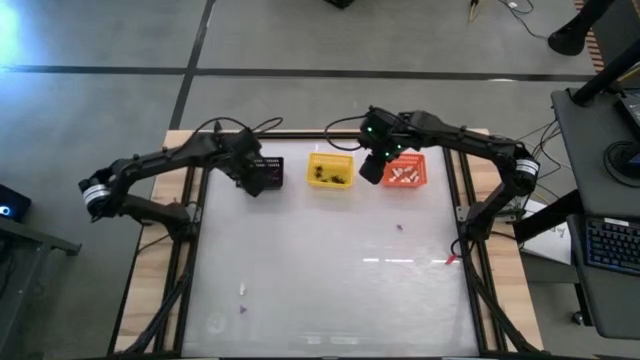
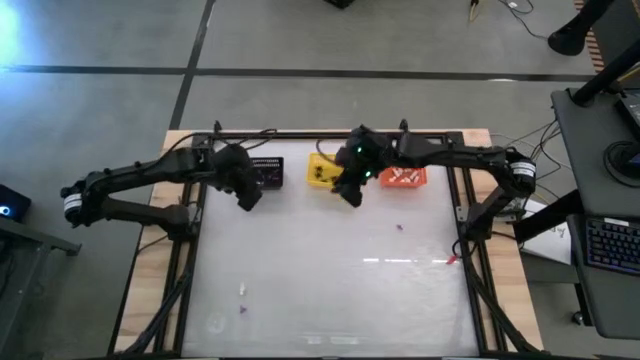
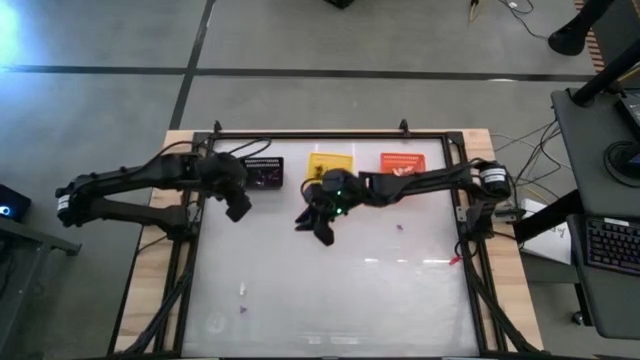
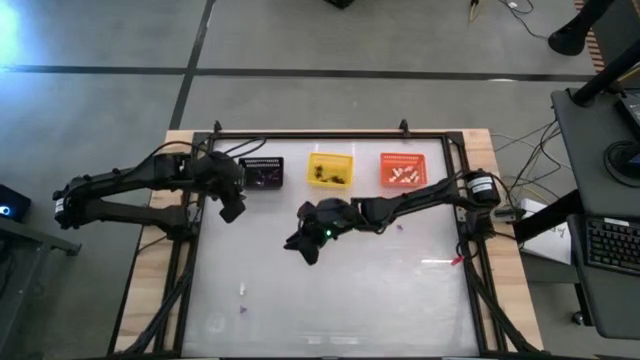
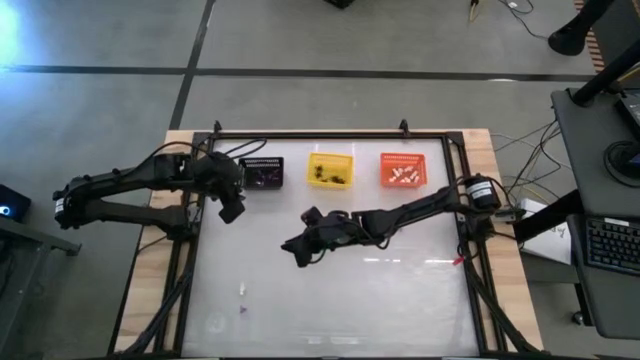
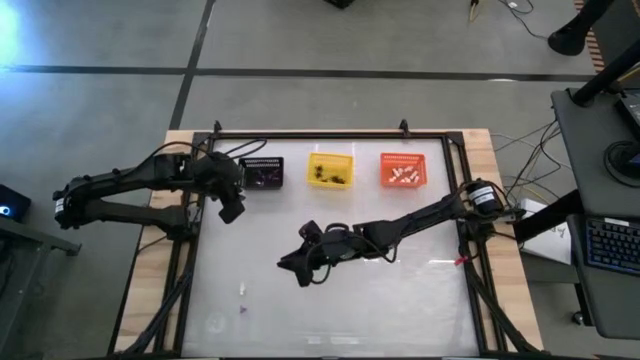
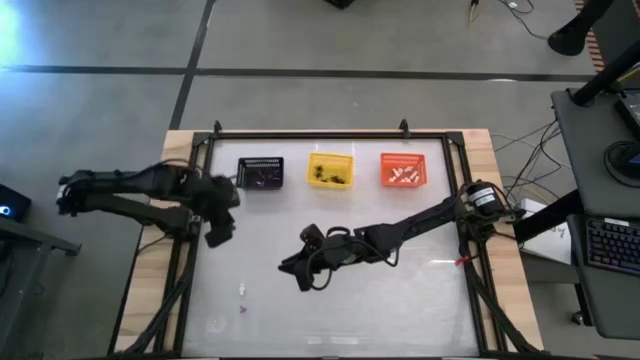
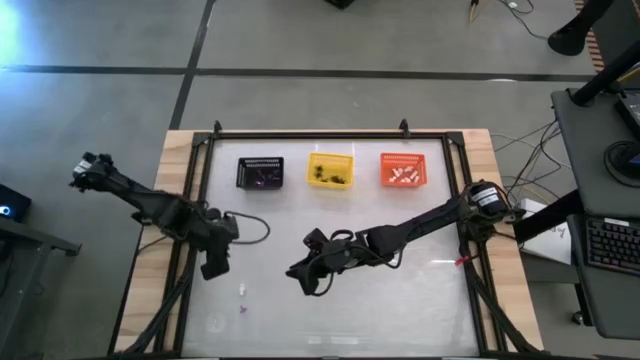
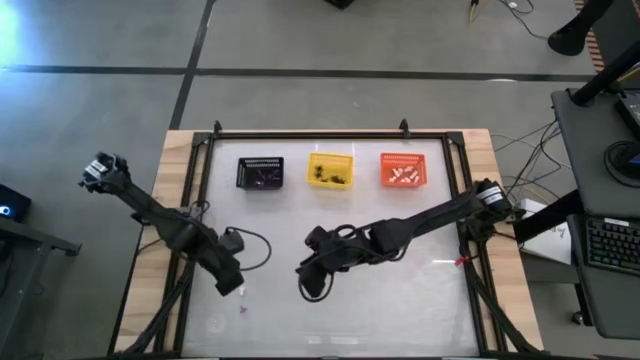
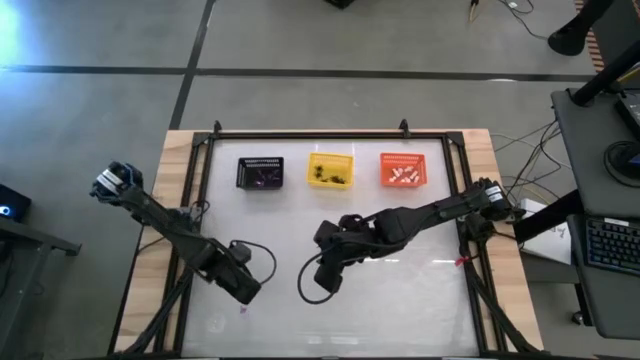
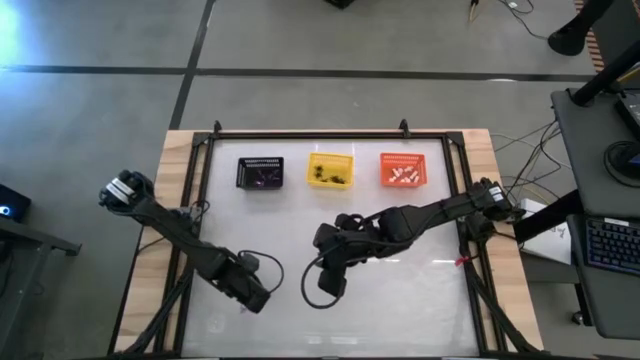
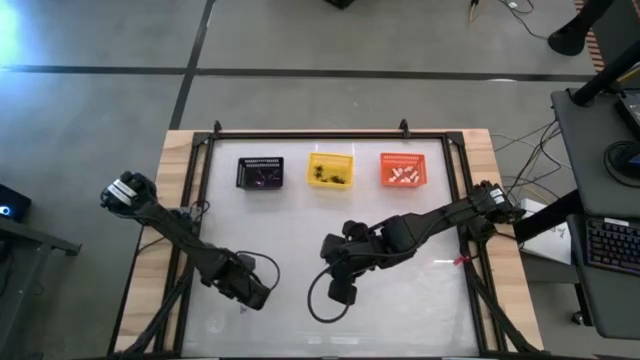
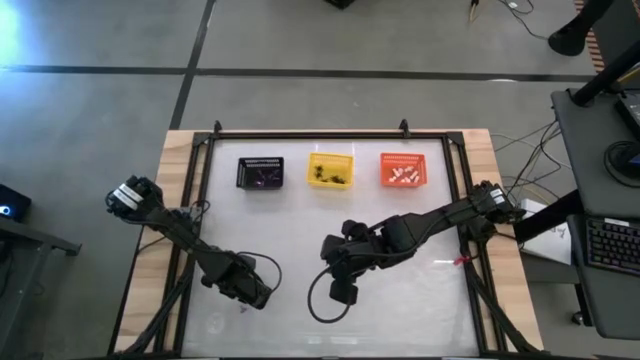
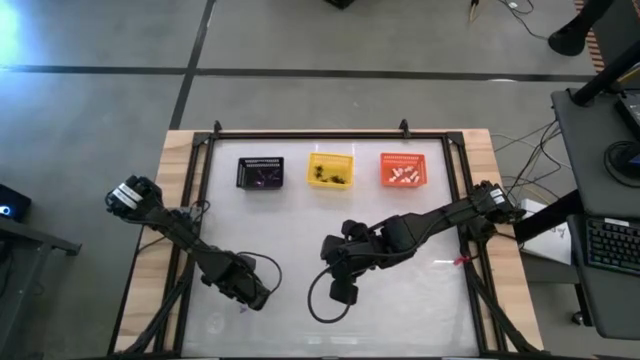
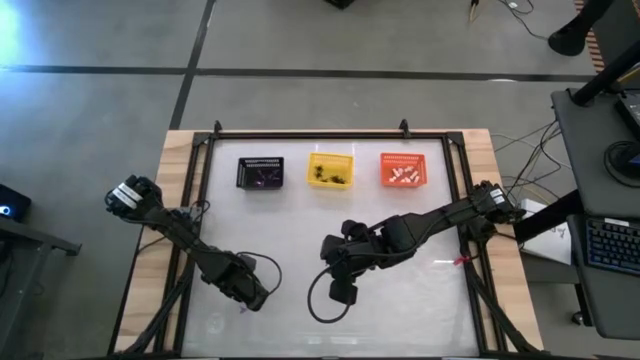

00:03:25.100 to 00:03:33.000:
Task: Sort Halloween decoration
Put the white skeleton toy into the orange bin

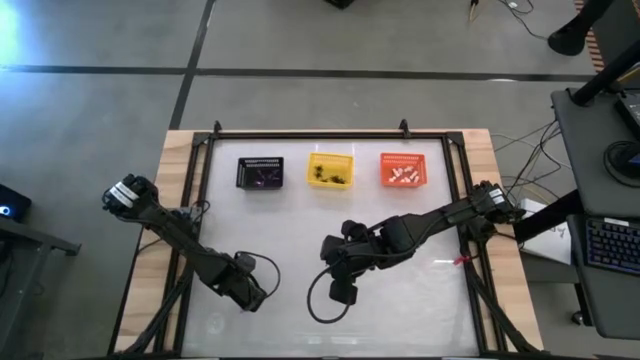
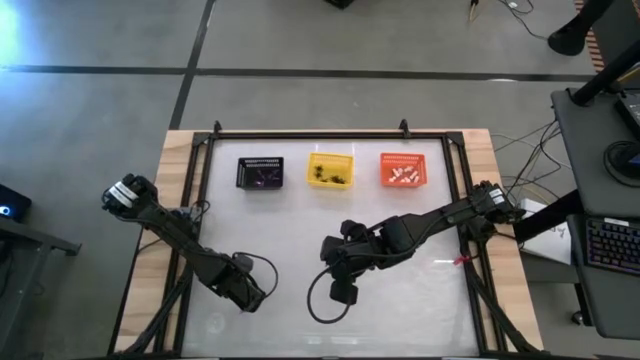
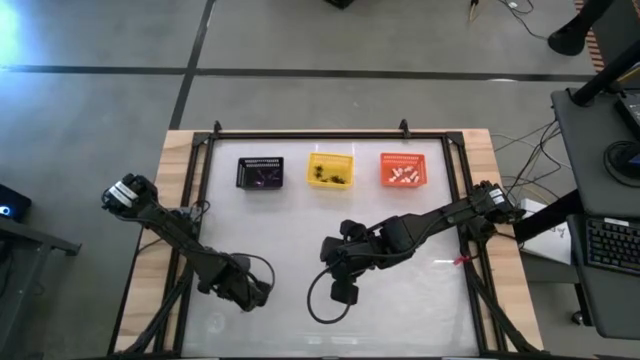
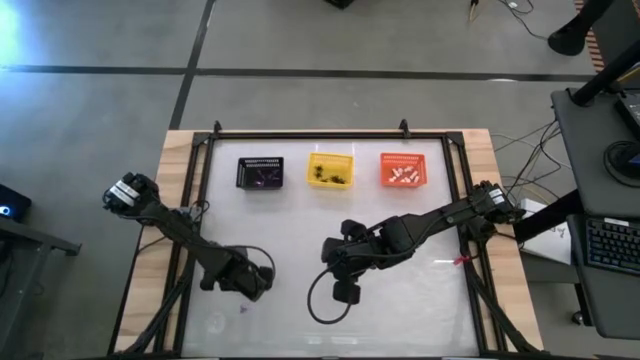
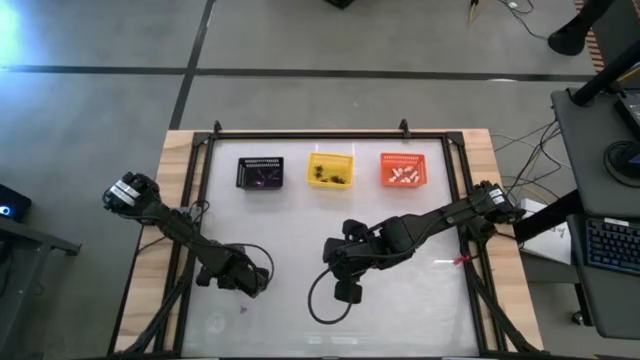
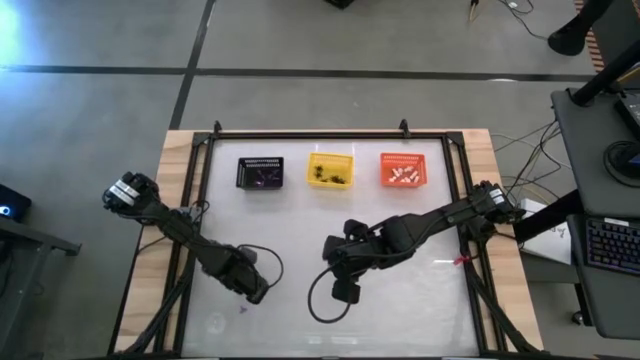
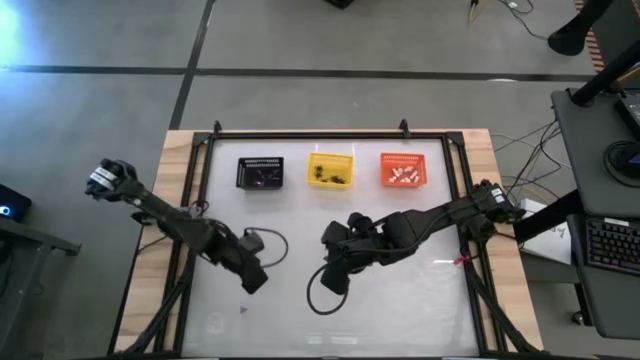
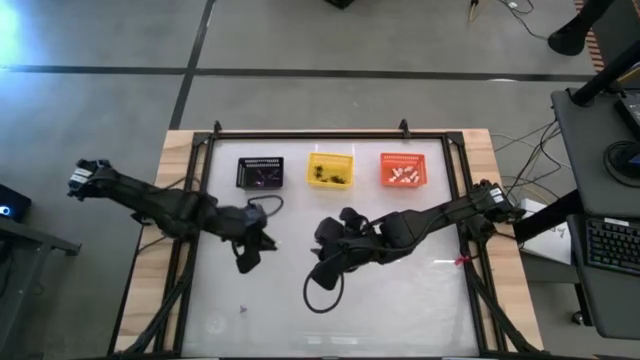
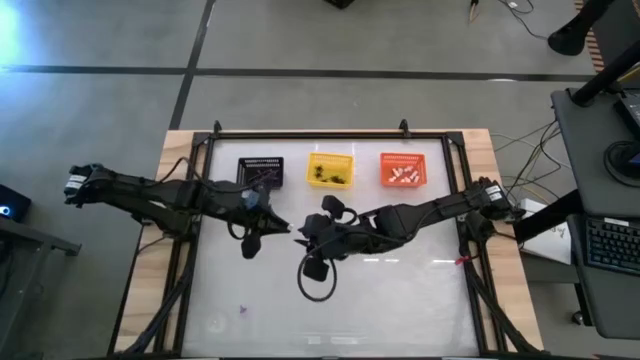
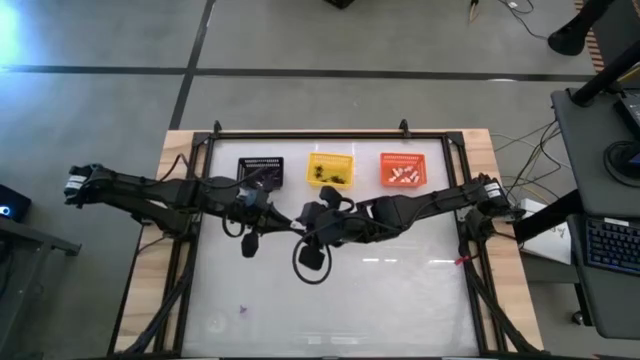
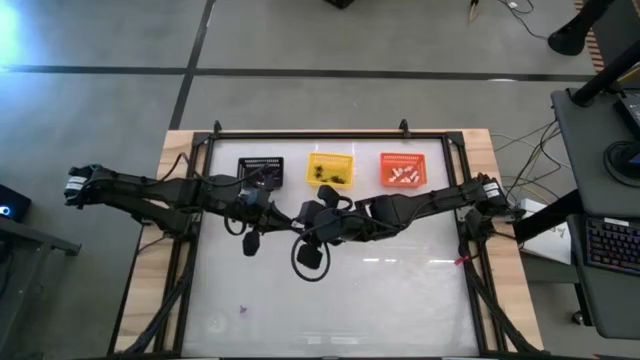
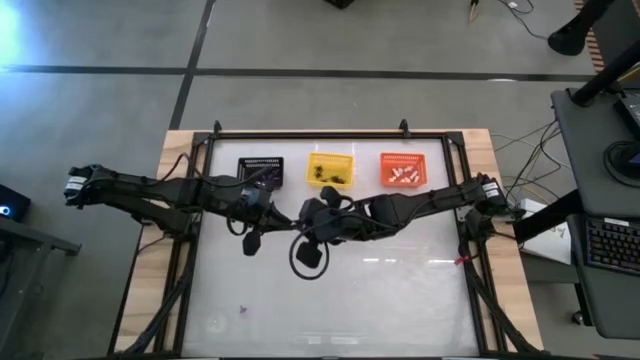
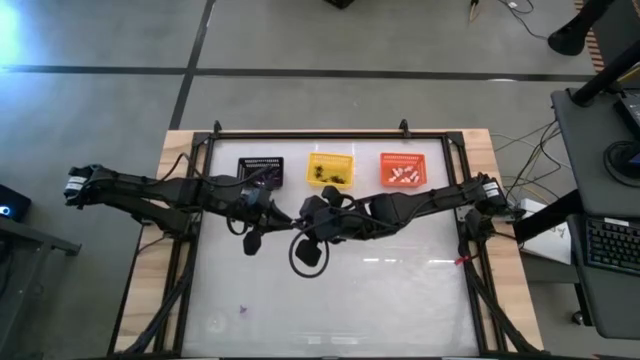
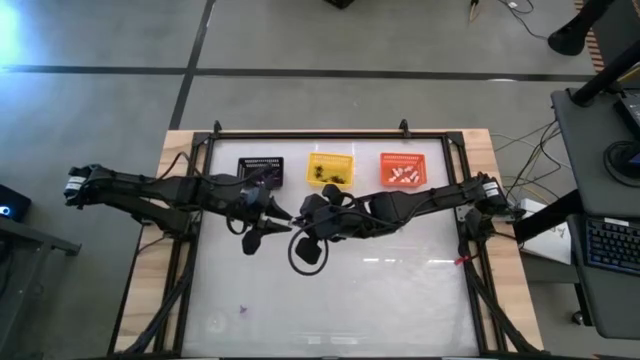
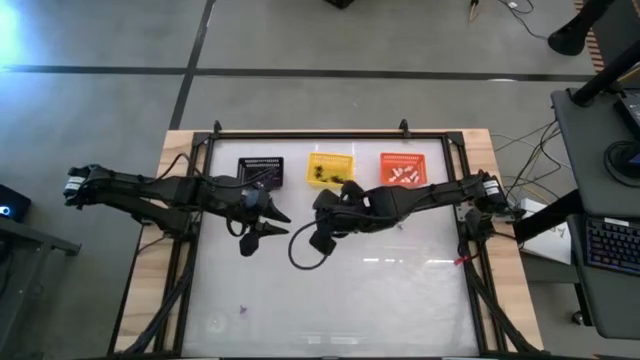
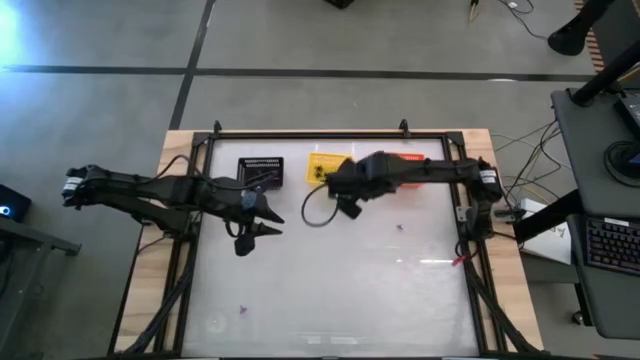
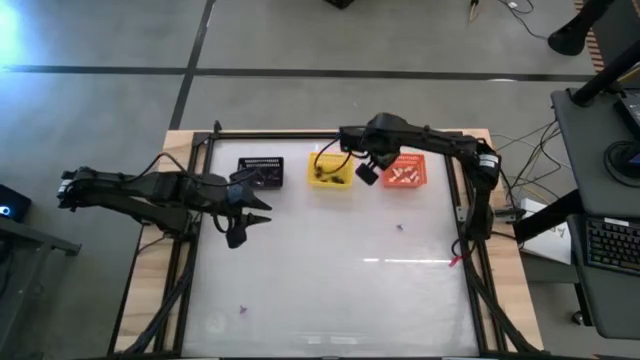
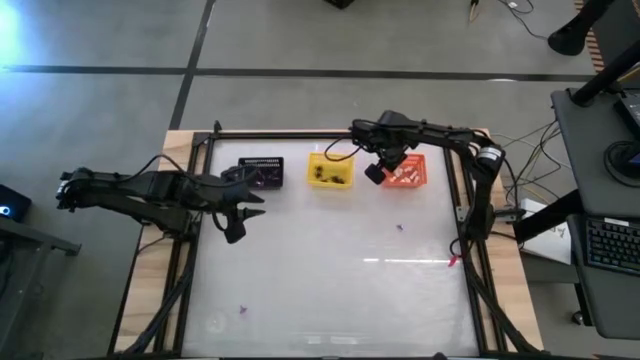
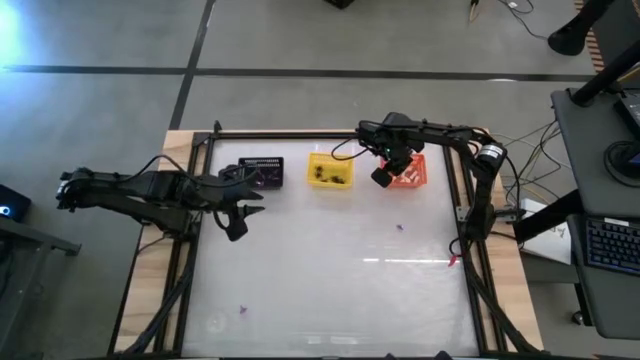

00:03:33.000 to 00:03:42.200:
Put the white skeleton toy into the orange bin

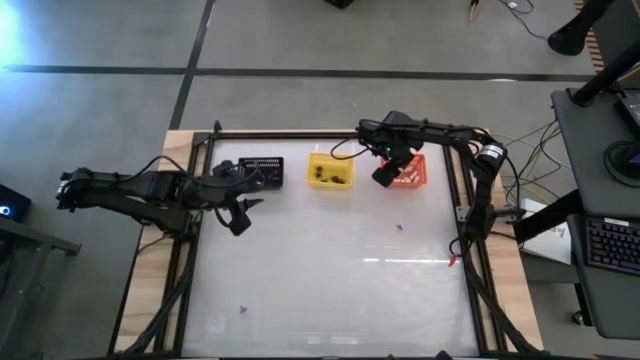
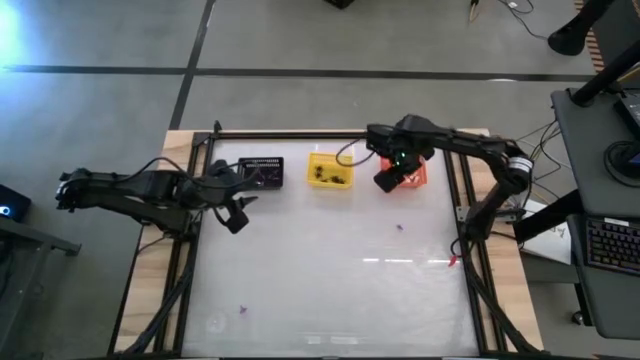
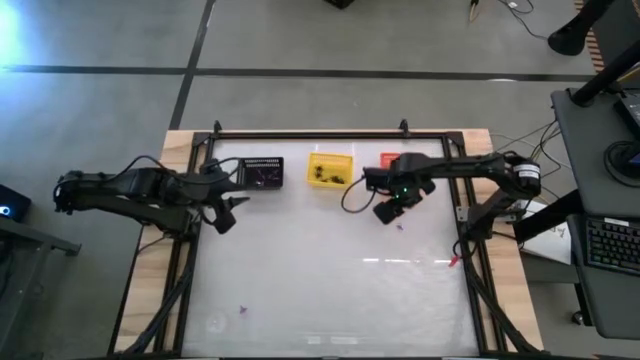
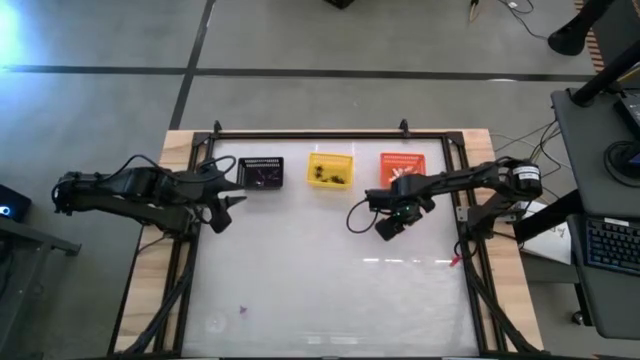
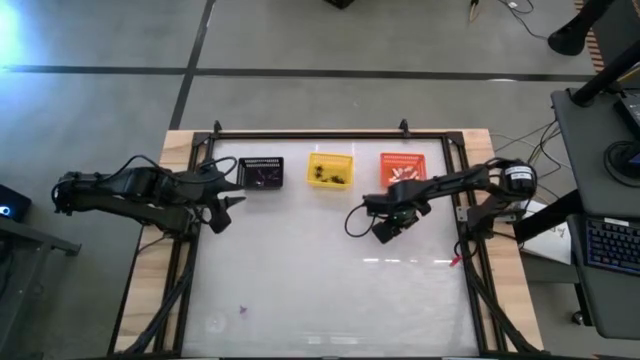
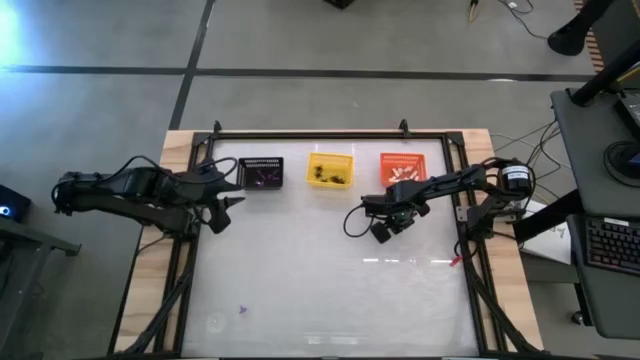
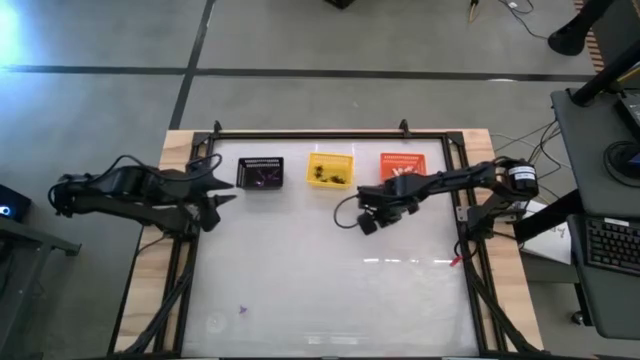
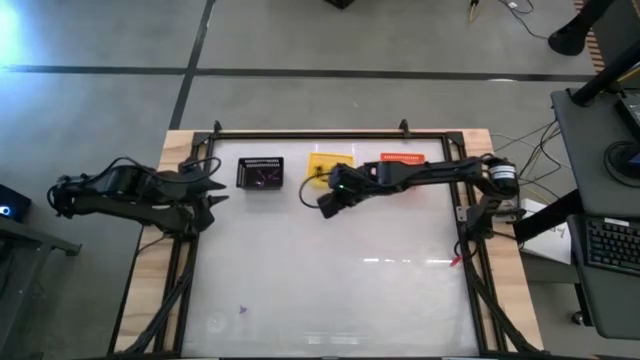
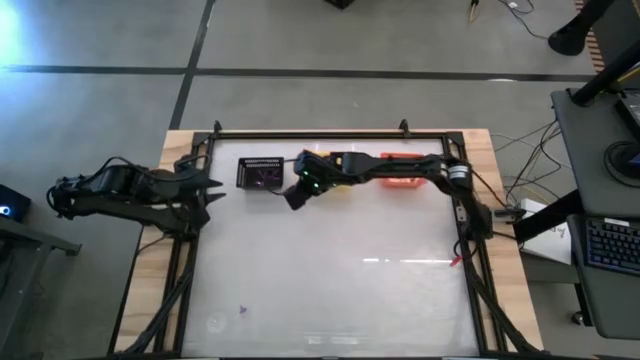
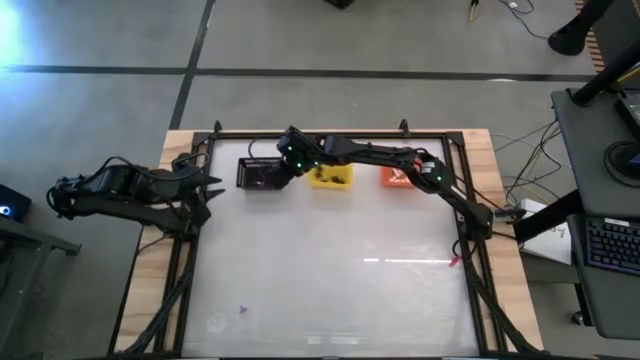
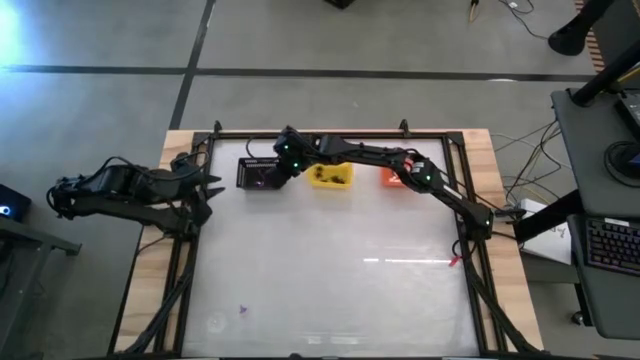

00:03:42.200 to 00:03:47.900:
Put the violet hat toy into the black bin
